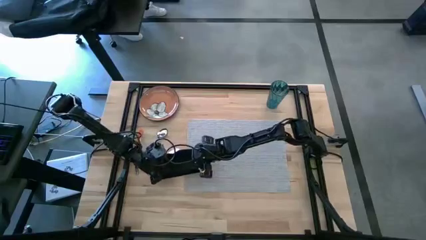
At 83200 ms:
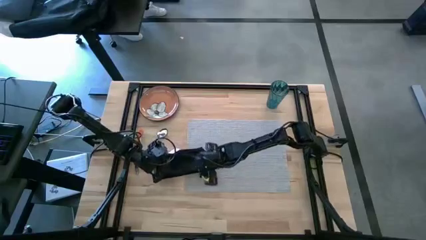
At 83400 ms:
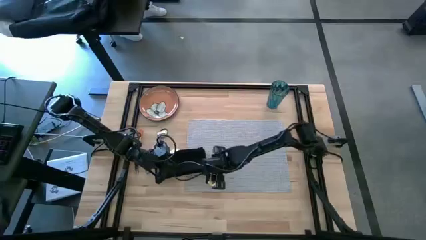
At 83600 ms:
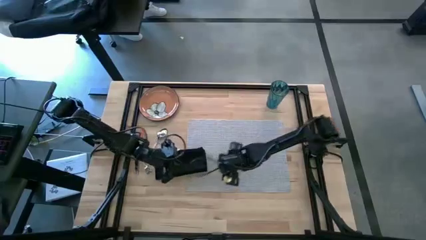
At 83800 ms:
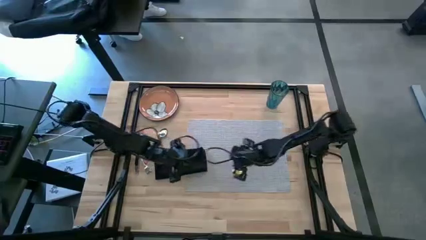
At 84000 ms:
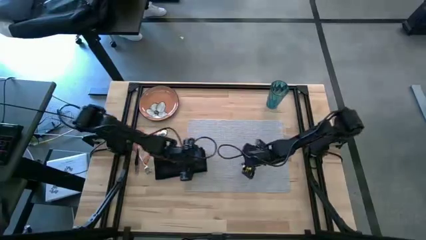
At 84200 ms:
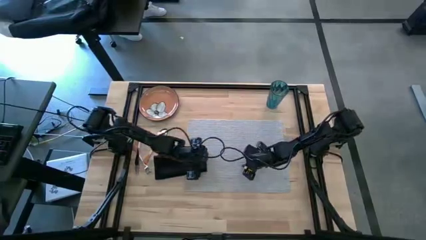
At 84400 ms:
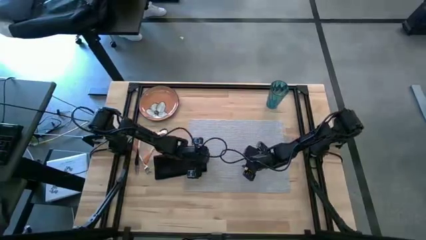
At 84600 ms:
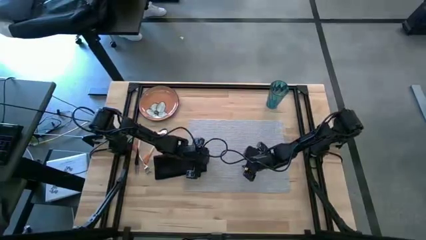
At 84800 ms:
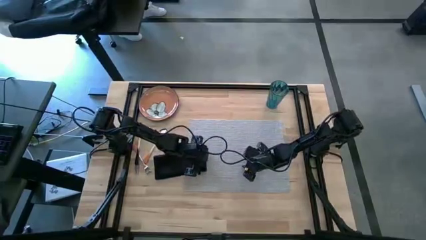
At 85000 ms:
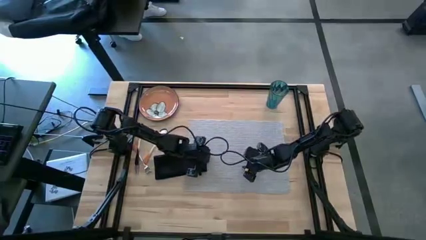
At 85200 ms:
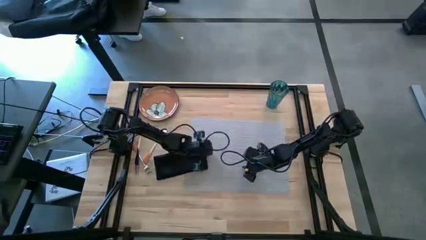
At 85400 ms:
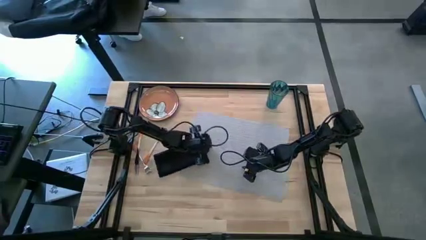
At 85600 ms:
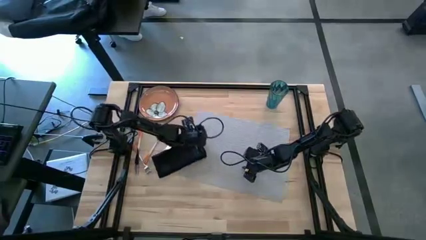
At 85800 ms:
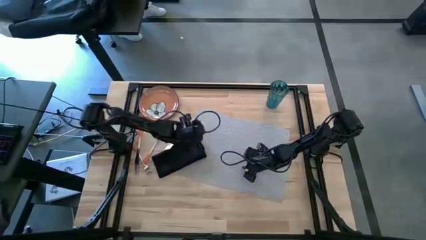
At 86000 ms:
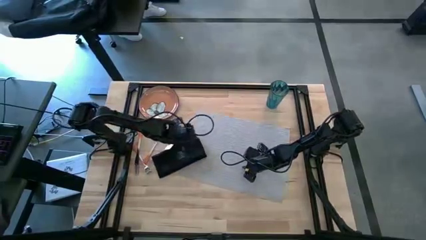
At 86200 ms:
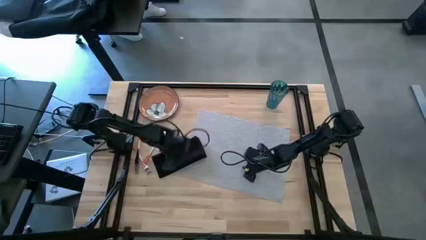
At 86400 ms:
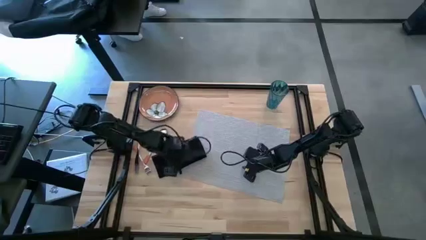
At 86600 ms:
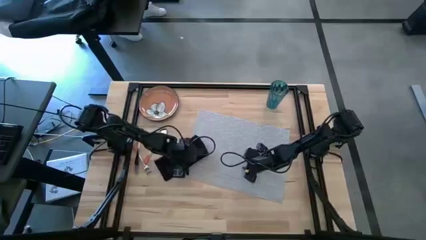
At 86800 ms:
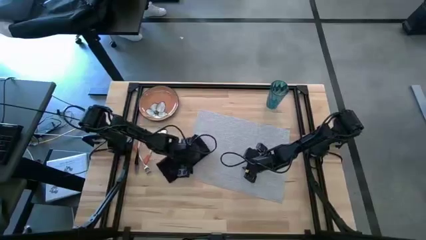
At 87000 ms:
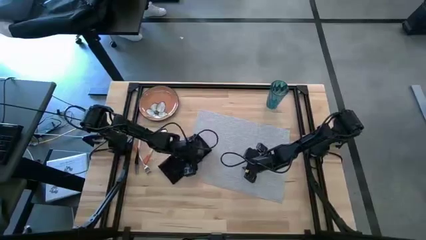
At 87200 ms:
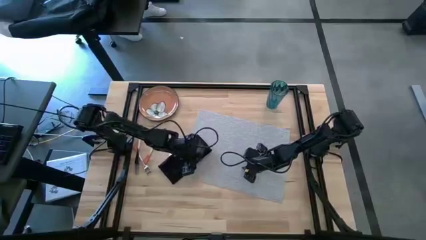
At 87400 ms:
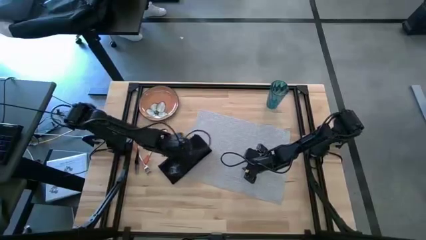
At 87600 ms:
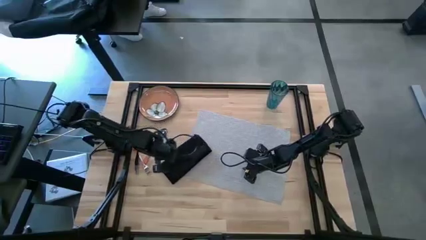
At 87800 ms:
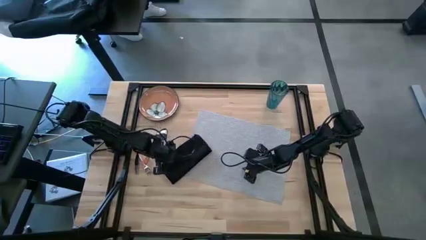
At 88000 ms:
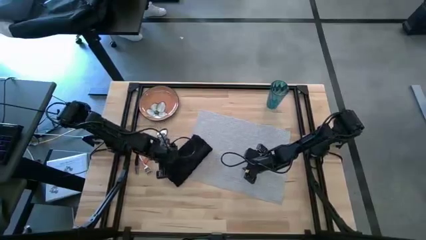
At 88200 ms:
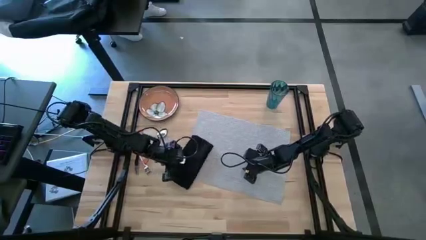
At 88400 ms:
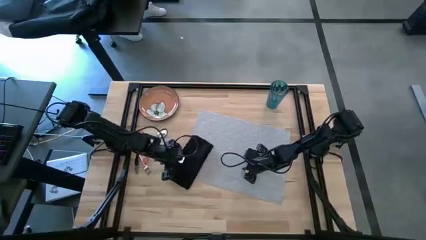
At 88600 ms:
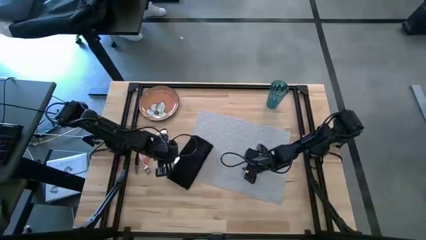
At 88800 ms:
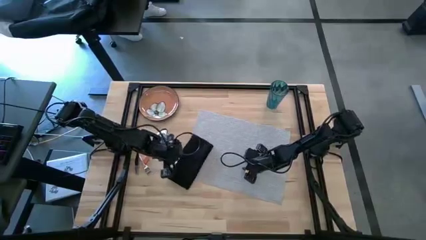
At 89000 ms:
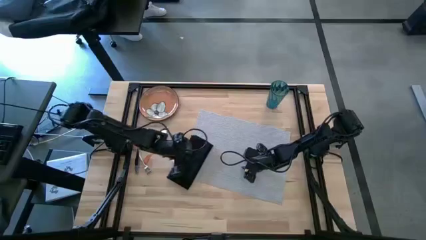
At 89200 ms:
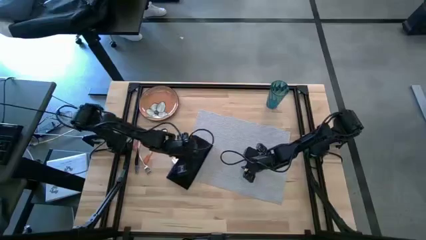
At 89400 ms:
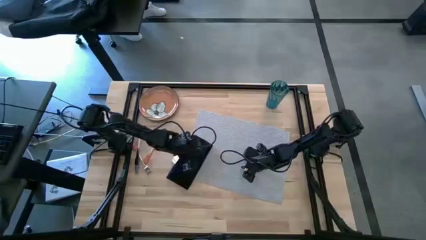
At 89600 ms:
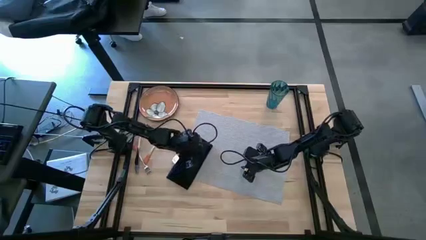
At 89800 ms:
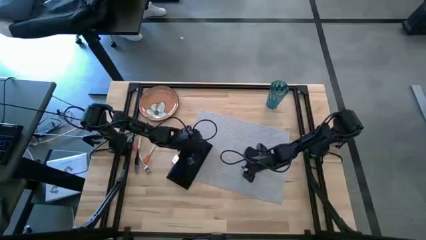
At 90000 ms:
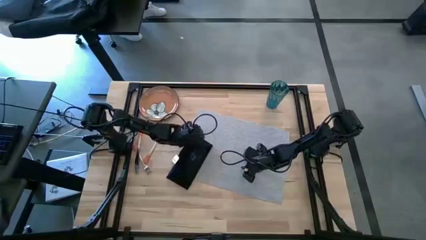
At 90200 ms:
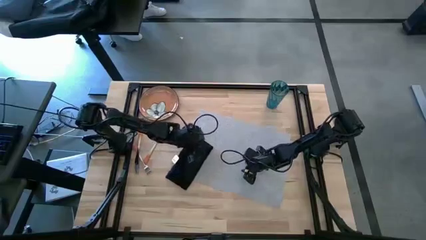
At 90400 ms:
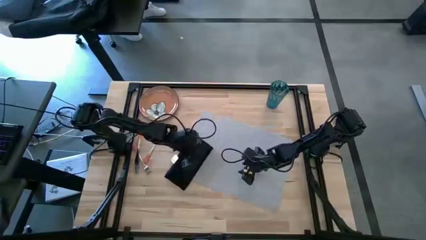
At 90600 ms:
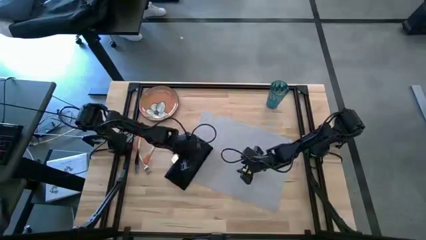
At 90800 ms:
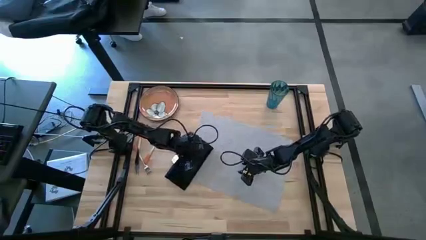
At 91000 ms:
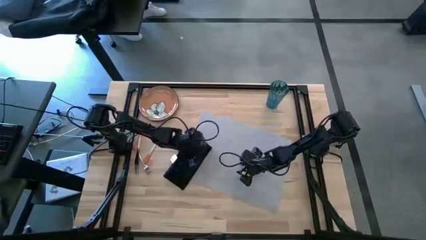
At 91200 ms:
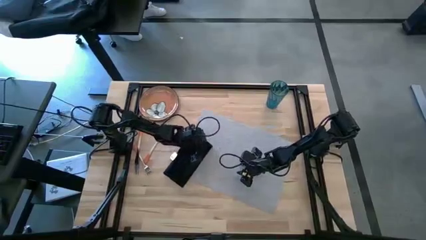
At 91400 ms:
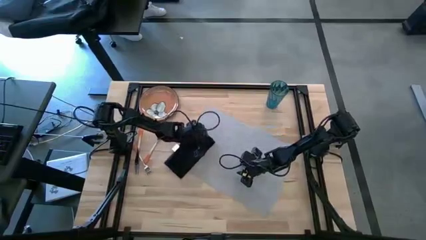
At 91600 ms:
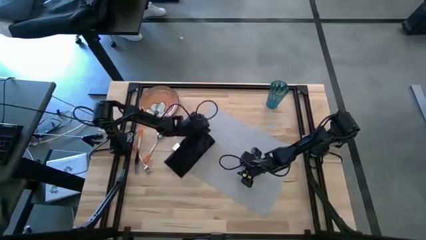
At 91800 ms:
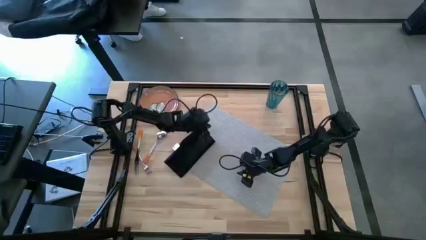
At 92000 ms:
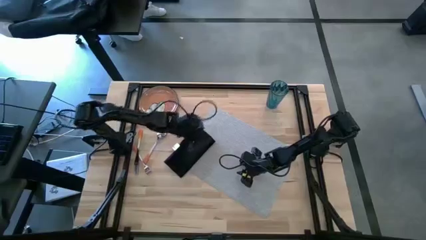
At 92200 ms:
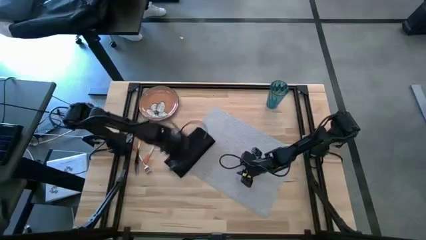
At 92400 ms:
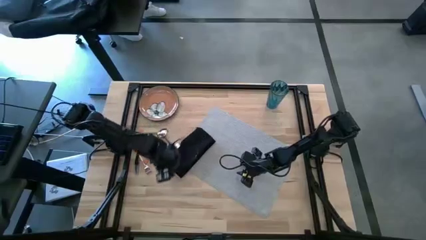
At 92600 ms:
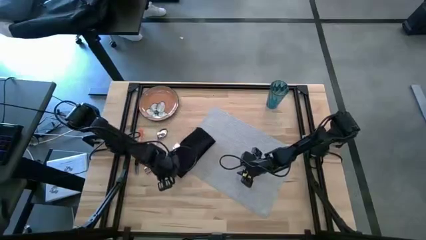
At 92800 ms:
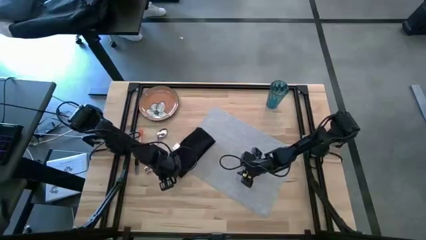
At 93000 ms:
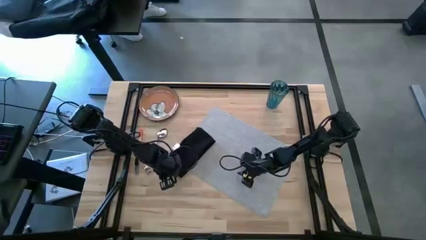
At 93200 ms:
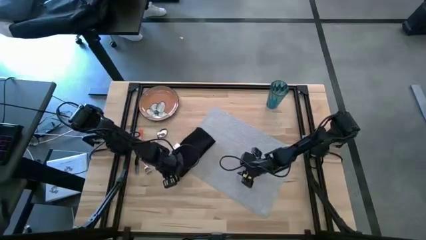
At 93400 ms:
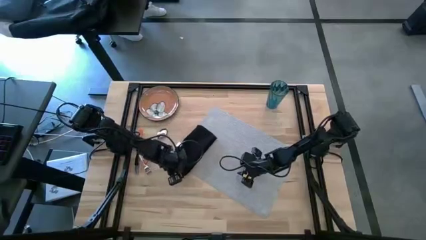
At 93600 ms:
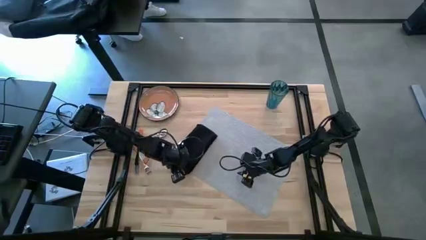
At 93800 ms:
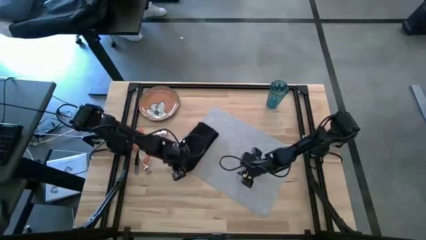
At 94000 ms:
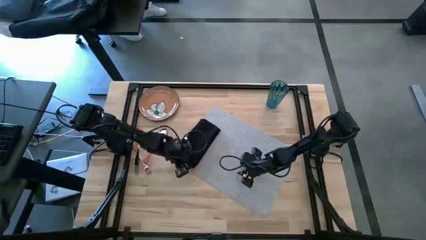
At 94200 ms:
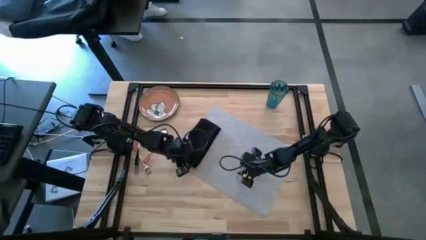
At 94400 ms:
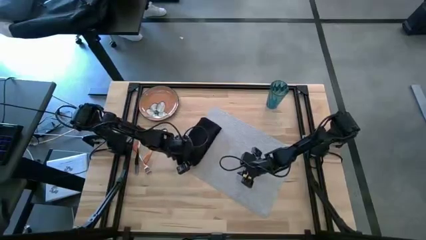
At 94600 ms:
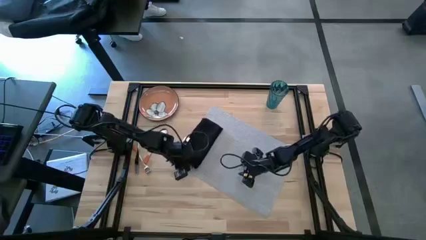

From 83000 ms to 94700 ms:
Task: Set table place
Put the black table napkin on the gray table mat

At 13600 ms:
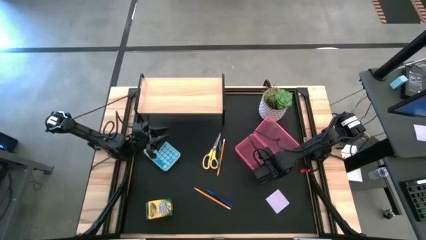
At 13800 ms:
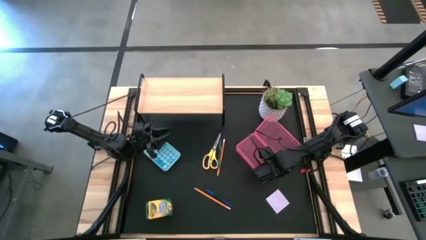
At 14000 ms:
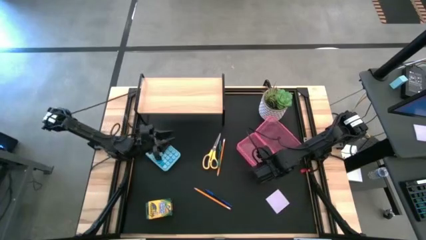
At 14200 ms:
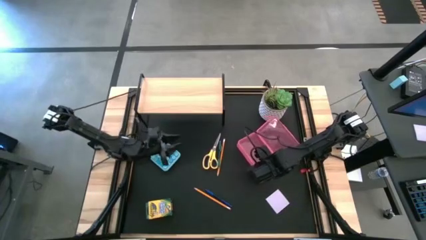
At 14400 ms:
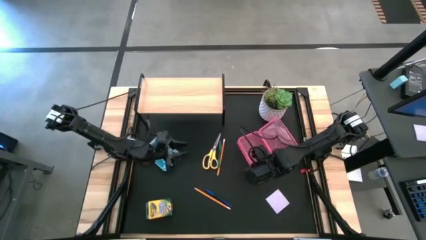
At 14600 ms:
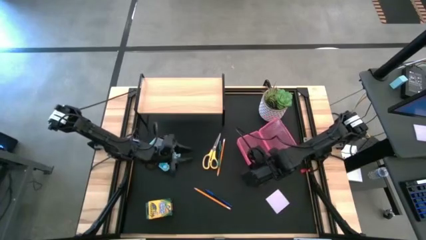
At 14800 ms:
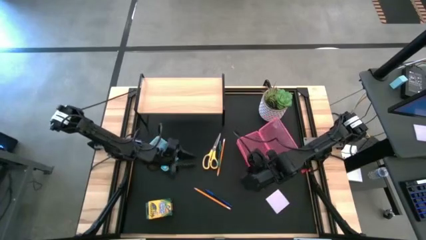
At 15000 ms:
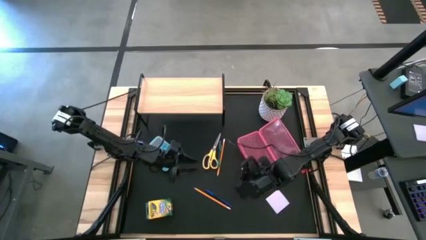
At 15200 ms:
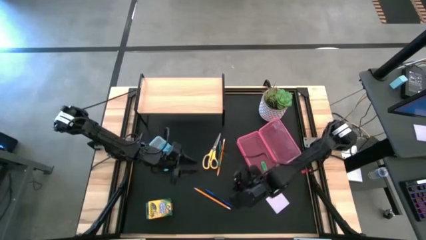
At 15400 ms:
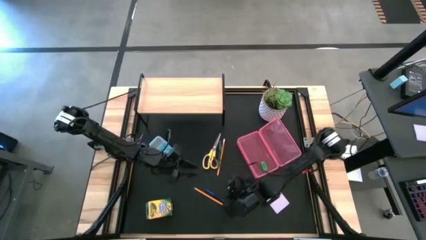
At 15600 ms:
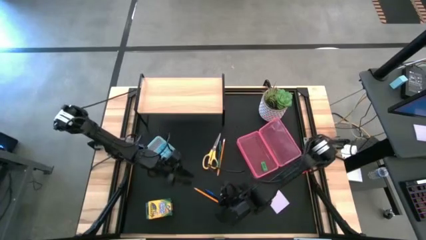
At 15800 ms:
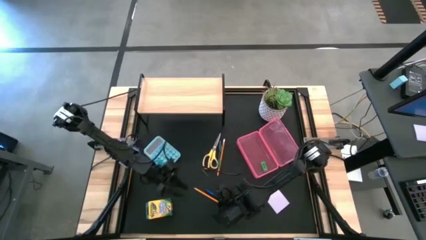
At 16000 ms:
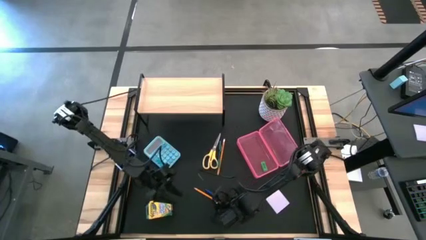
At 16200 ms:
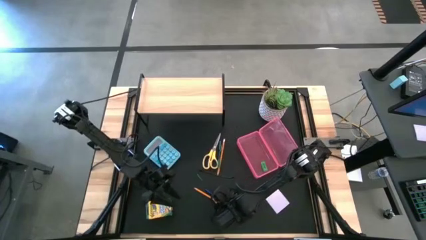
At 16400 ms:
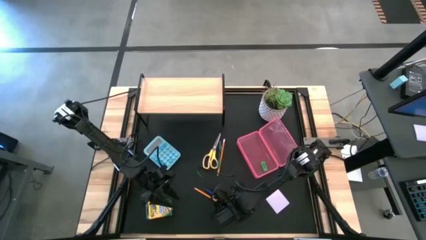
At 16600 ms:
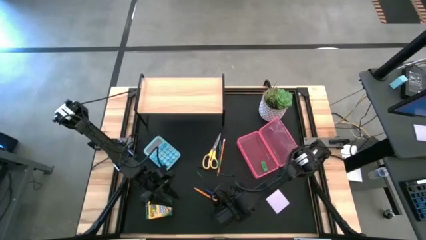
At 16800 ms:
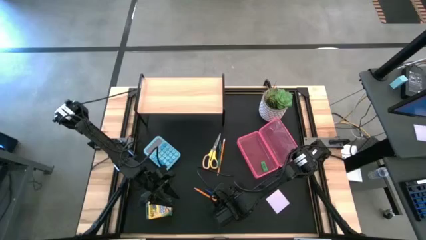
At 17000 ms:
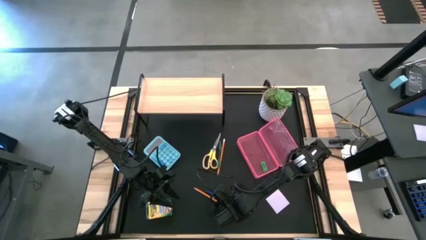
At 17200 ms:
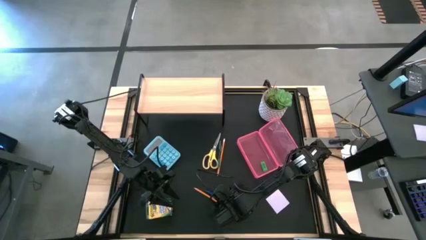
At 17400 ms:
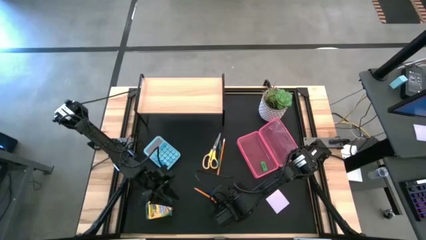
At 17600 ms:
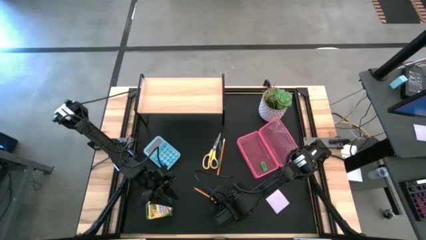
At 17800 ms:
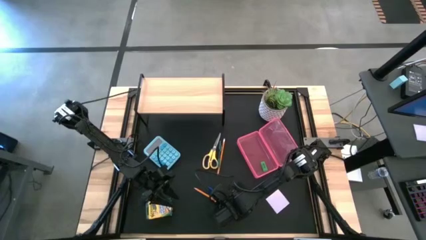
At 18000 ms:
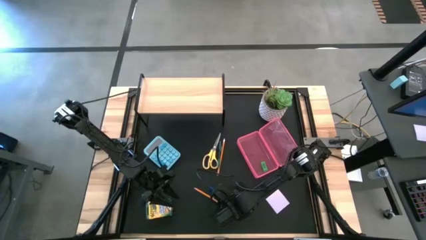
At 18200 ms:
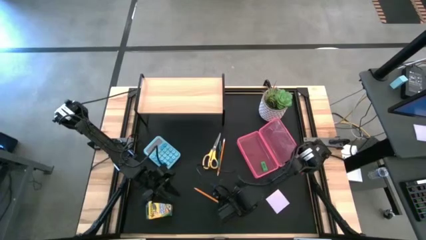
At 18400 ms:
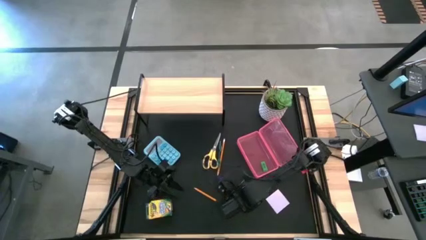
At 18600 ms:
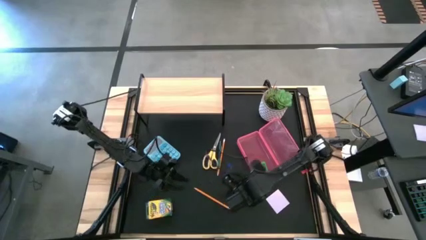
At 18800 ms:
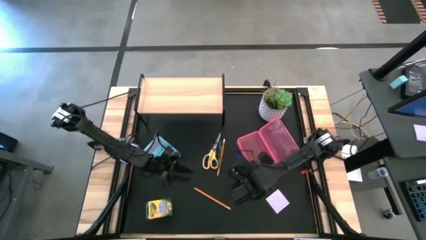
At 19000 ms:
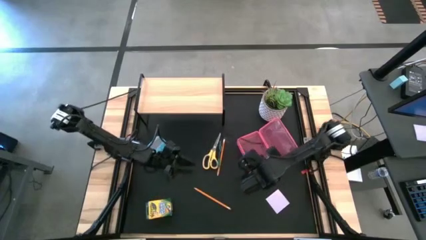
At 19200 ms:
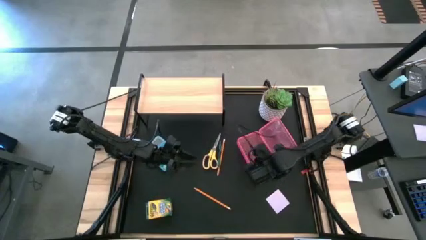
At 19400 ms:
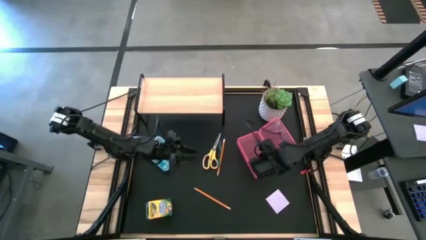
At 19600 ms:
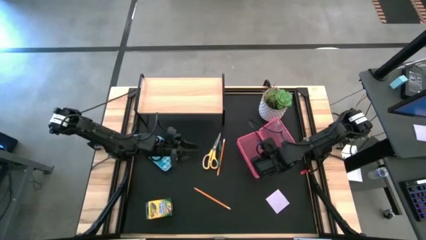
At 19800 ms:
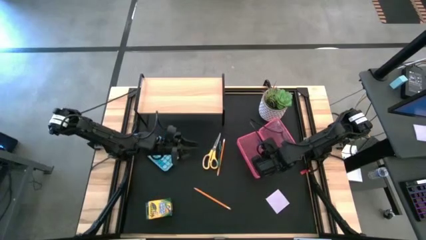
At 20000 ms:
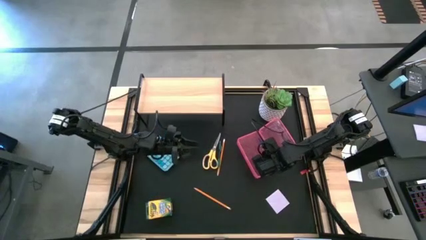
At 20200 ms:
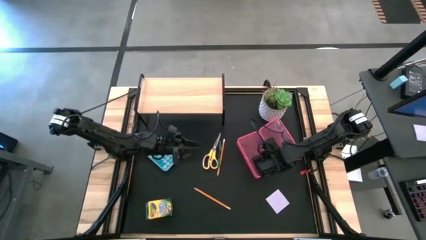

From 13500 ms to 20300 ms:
Task: Pack school essentials
Put the blue pen into the pink supply box
